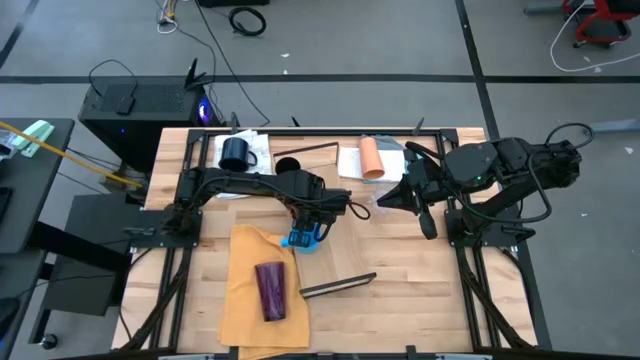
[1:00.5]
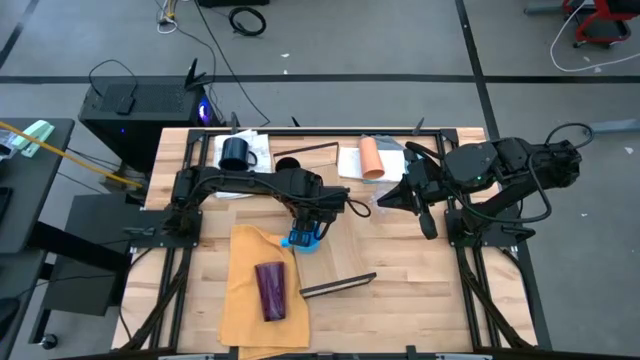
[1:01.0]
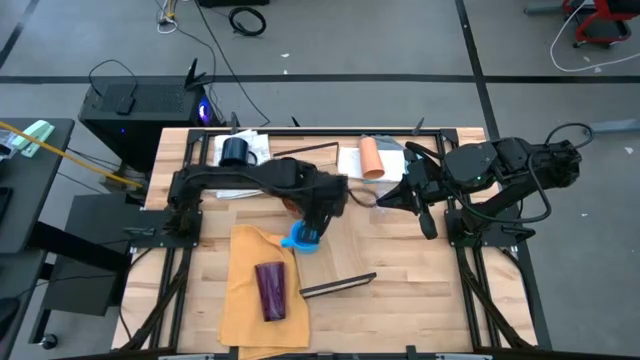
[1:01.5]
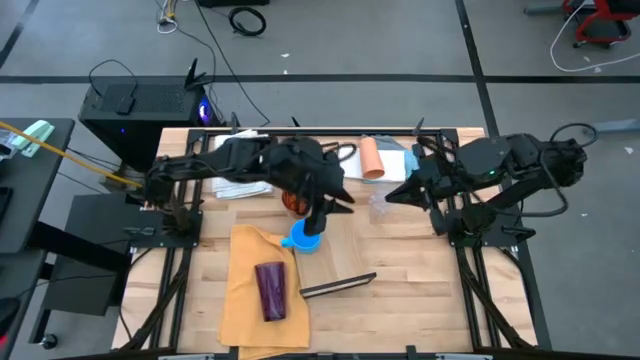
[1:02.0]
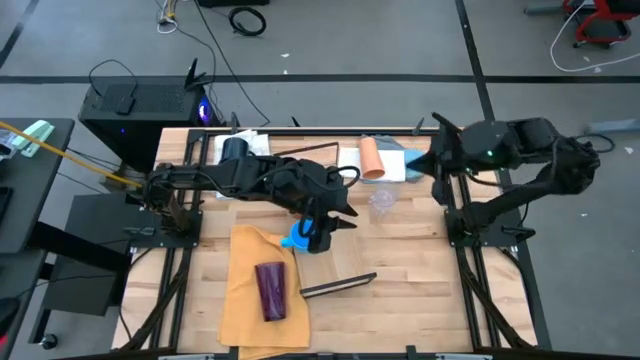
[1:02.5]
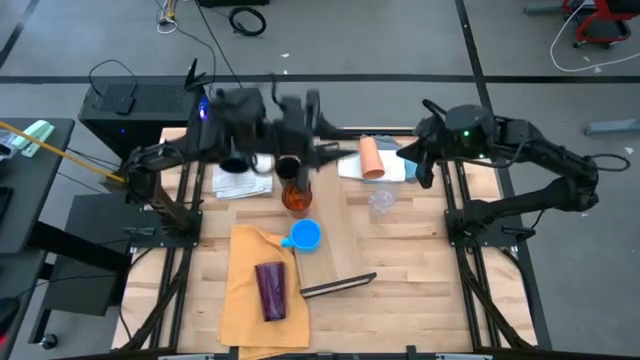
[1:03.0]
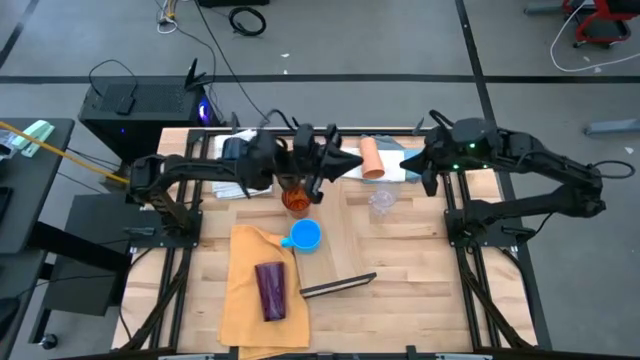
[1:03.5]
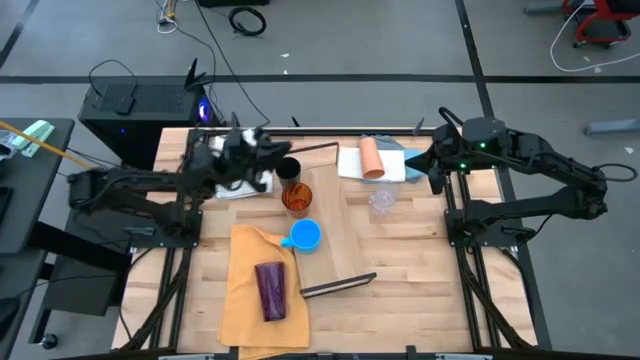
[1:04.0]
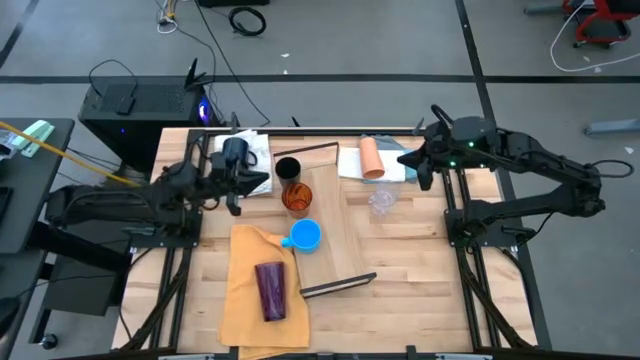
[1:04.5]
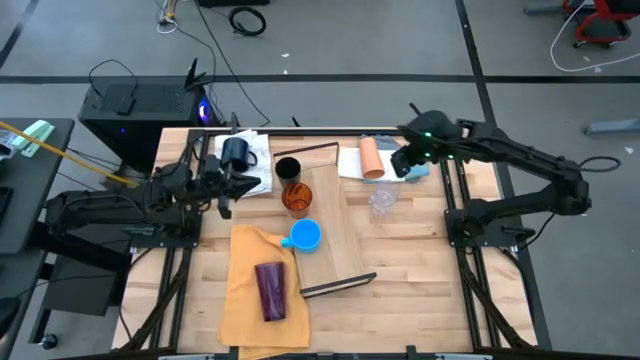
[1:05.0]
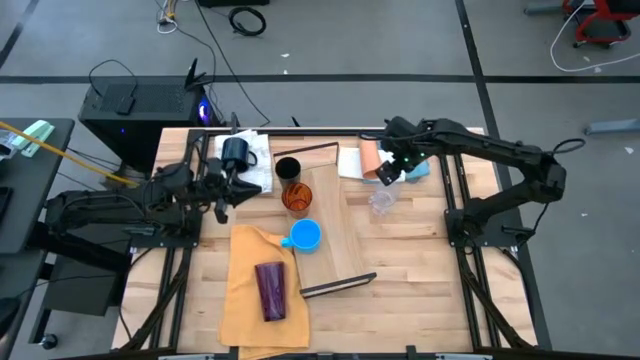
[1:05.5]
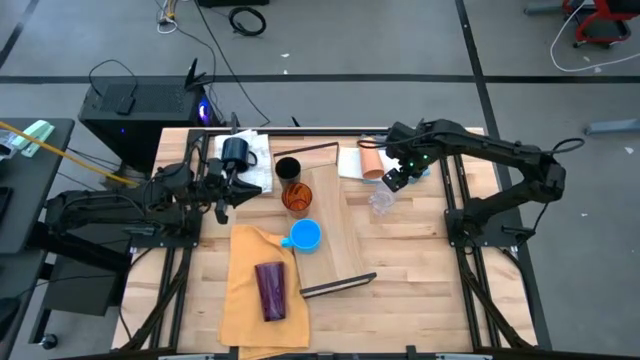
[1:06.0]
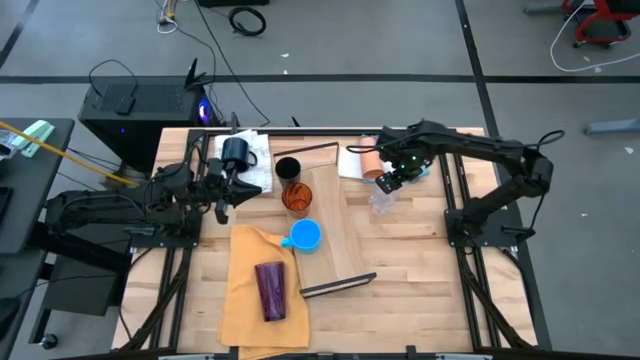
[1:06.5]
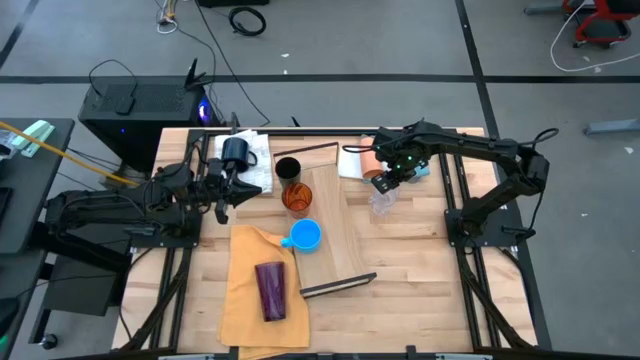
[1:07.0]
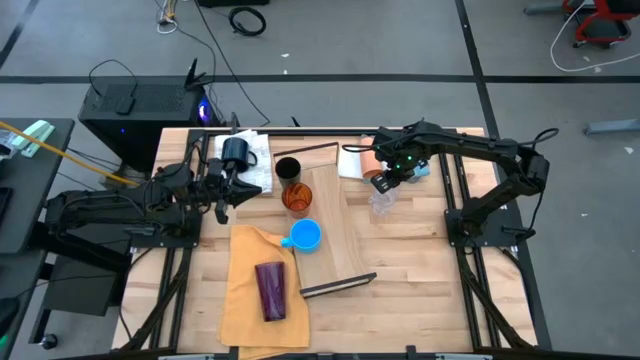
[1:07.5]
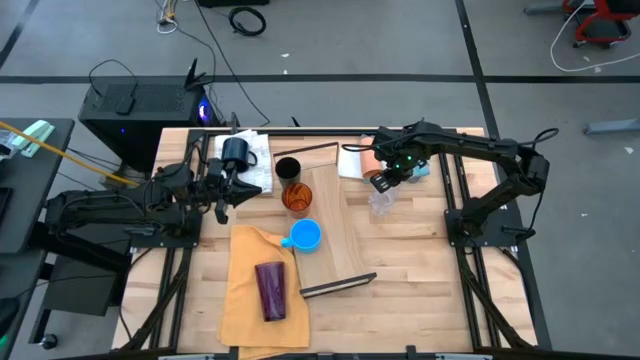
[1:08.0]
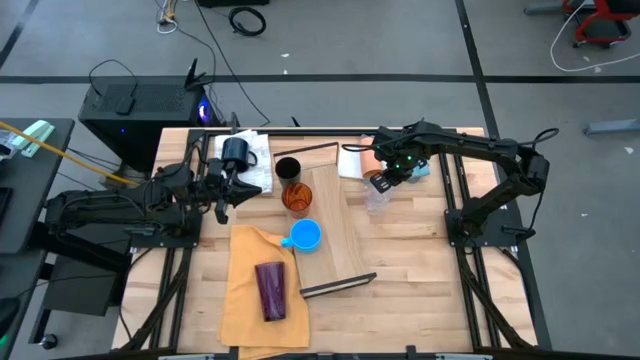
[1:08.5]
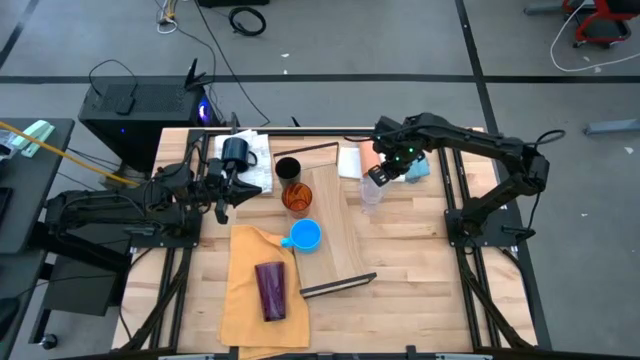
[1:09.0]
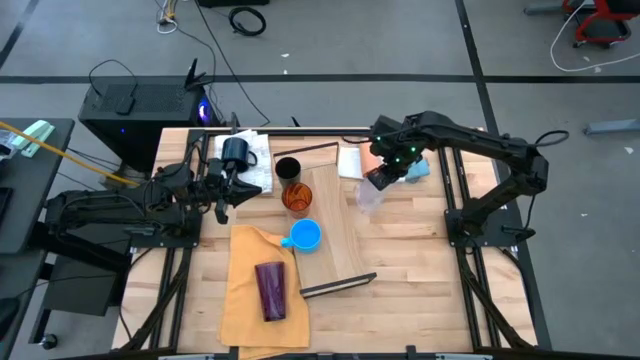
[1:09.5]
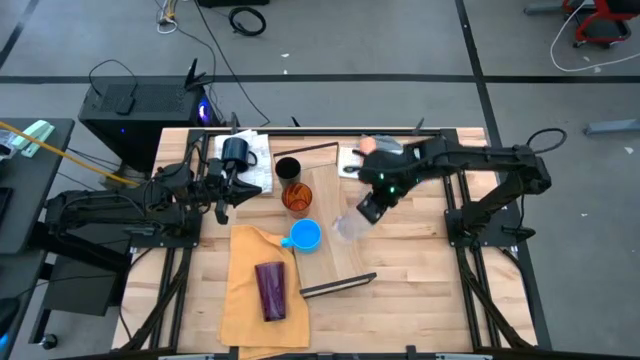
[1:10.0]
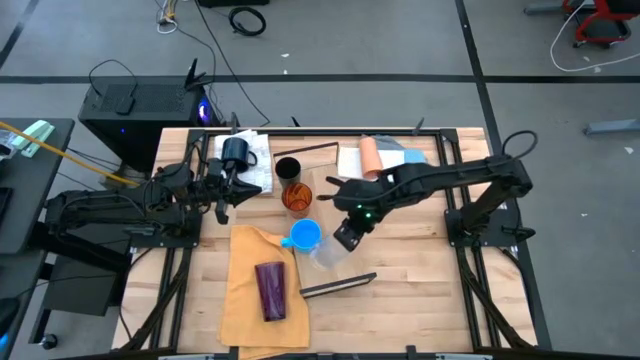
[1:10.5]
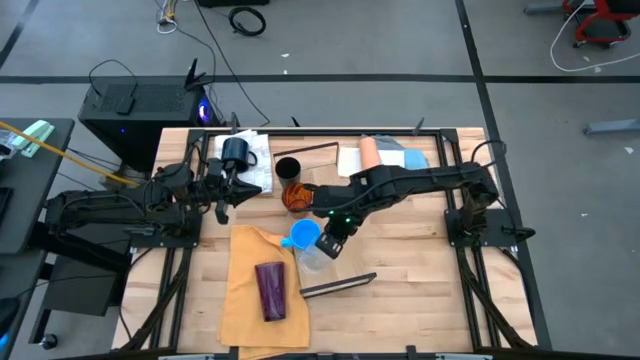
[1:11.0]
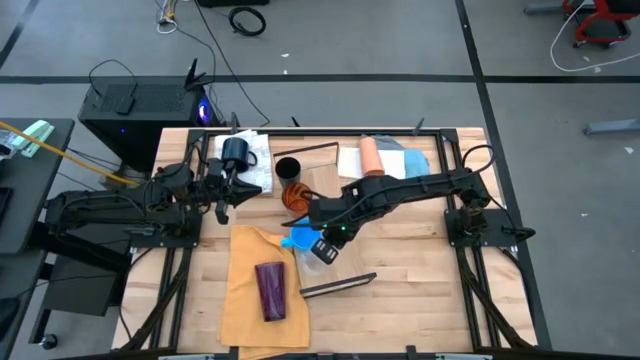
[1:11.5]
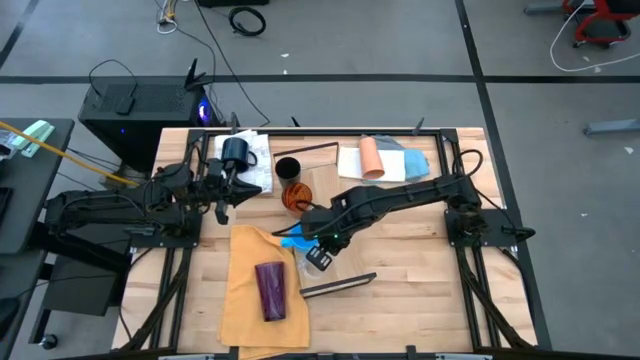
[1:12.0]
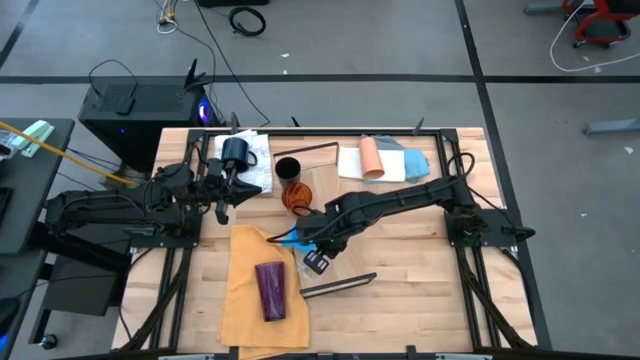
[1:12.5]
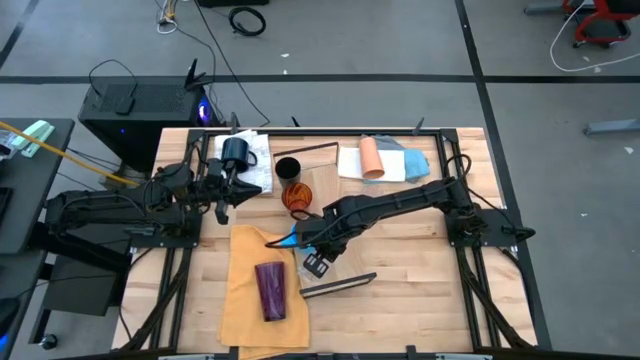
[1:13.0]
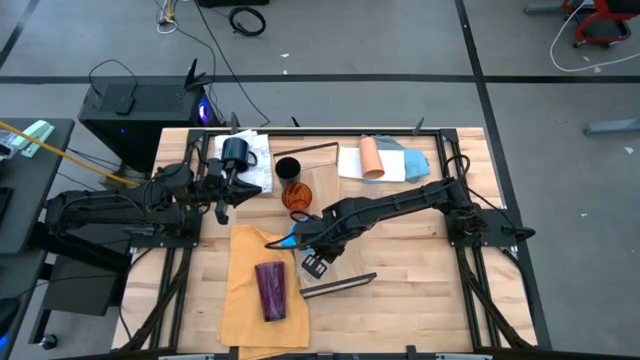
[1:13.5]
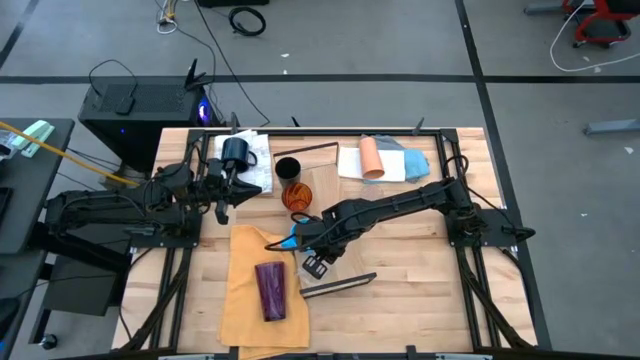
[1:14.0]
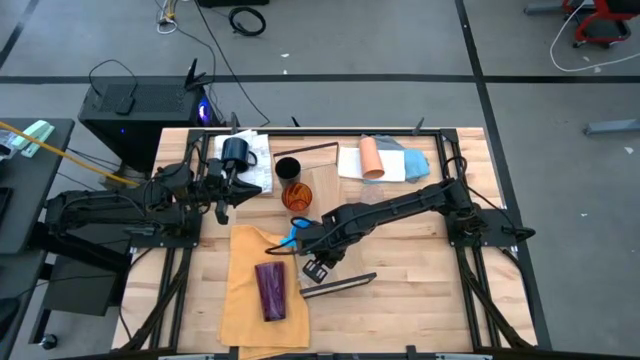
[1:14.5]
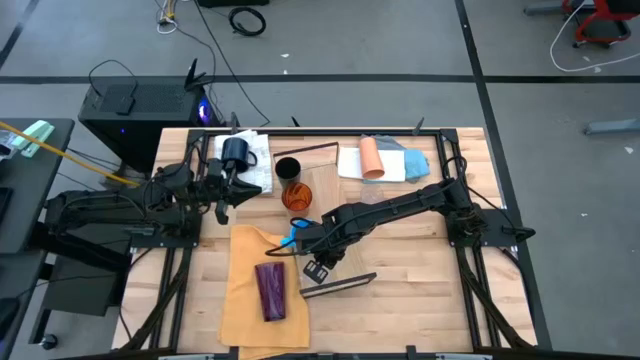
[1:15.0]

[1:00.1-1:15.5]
Task: Stack small to large cups/mugs on shelf
Put the transparent mug on the shelf

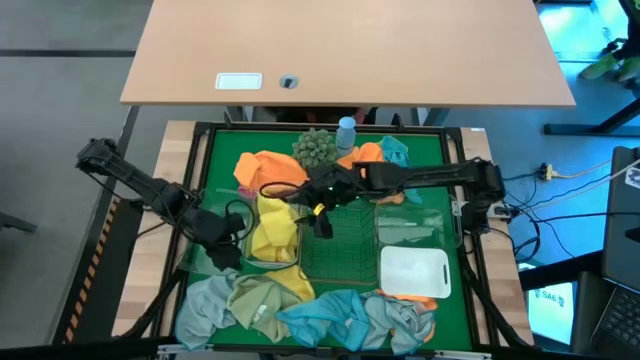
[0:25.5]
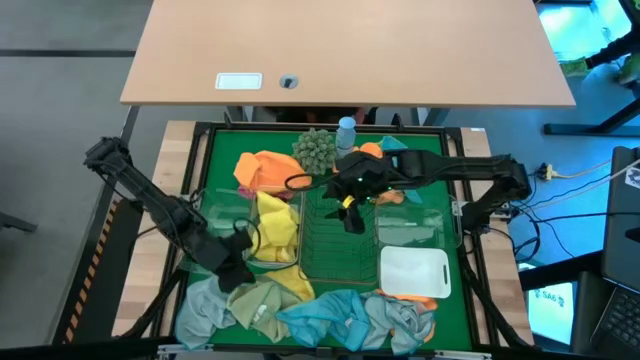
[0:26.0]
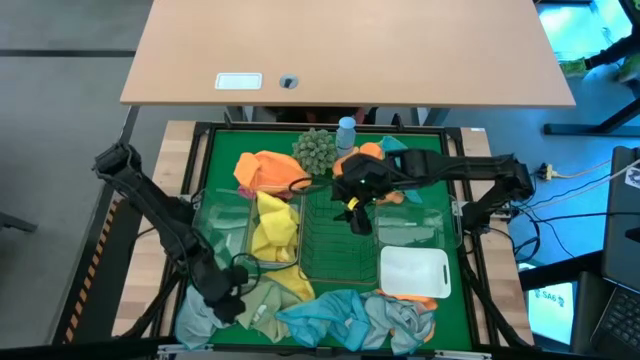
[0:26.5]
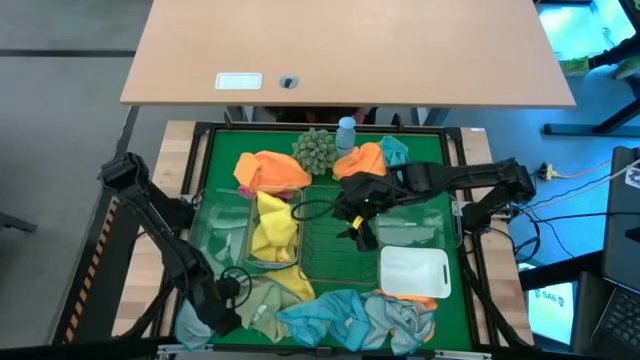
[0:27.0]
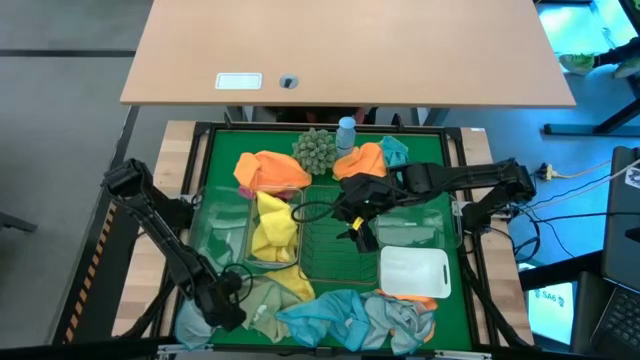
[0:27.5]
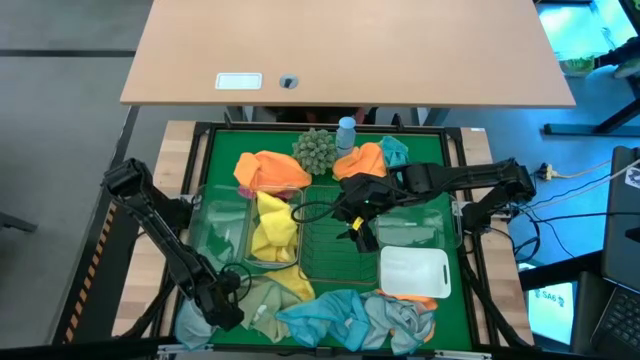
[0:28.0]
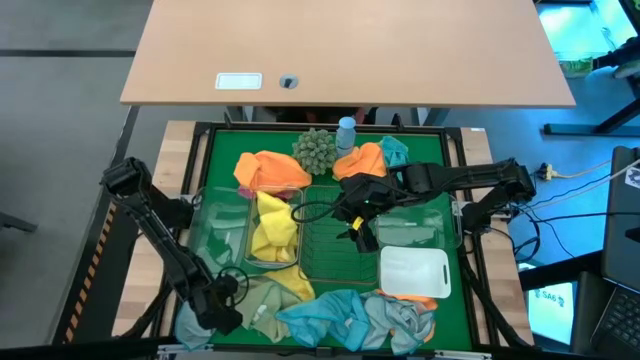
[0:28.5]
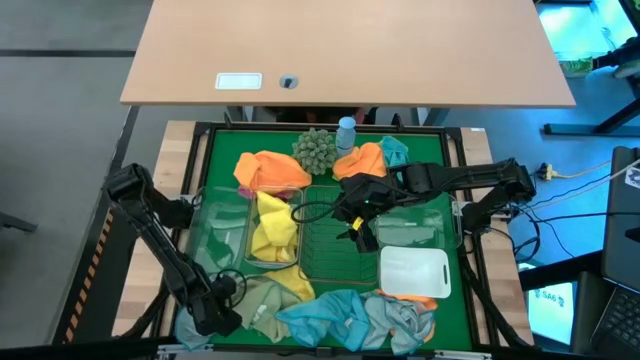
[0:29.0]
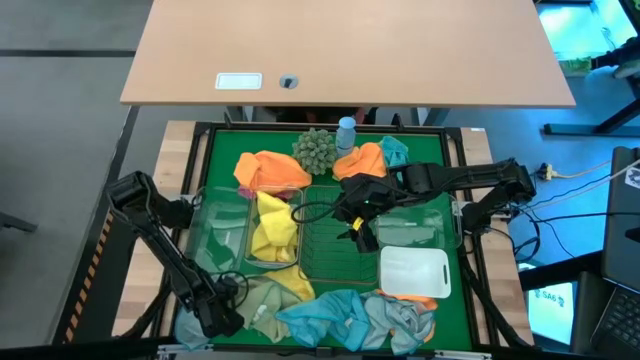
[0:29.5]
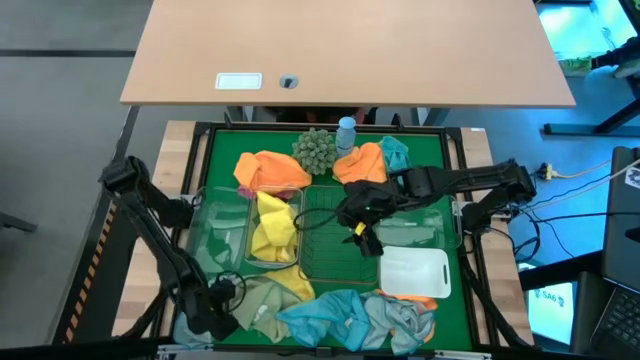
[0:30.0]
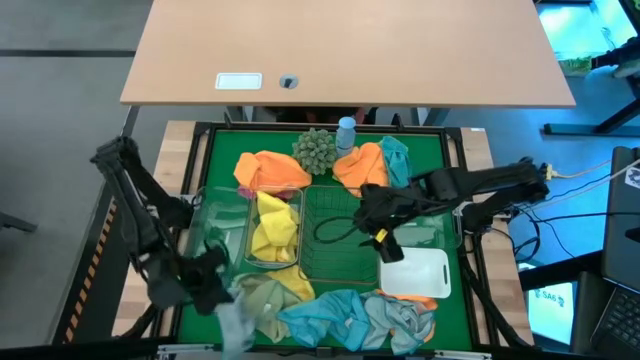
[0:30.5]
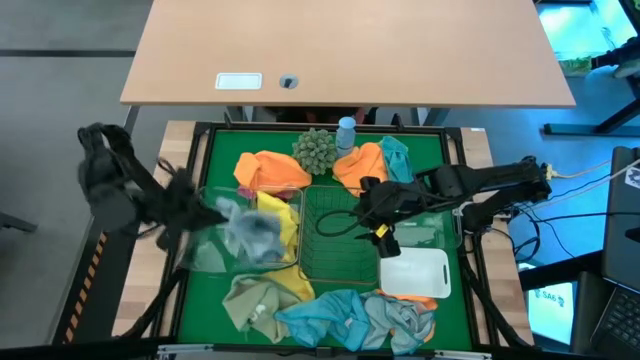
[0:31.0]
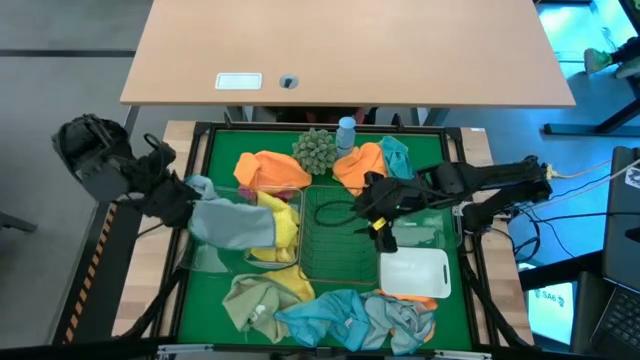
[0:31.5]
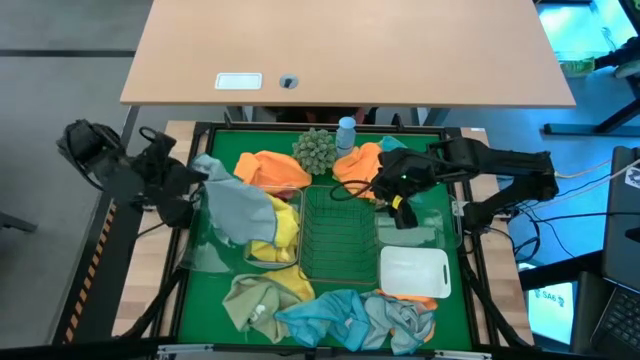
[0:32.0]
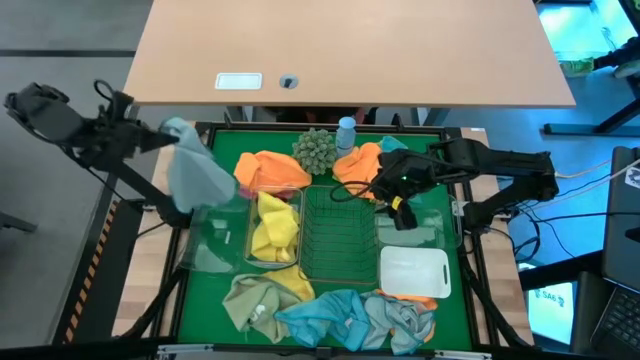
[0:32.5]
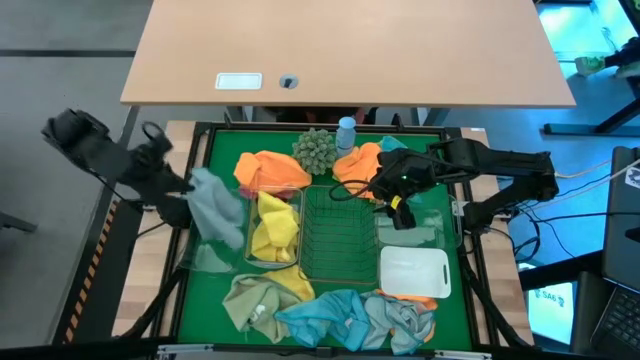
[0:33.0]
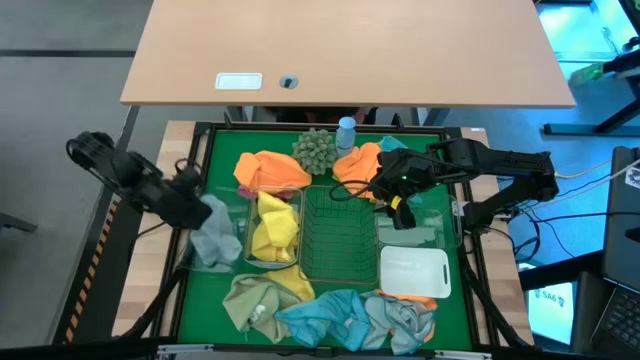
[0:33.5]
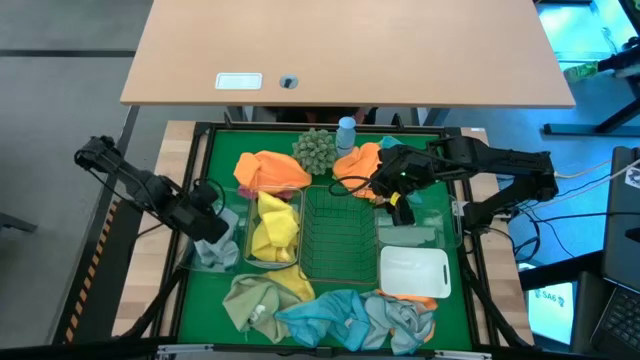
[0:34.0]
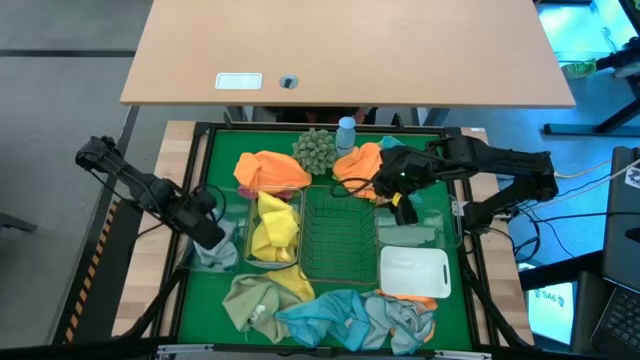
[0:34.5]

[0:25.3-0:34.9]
Task: Sort microfiber towel by color & place in baskets
Put the bottom left light blue microfiber cloth into the left transparent bin
